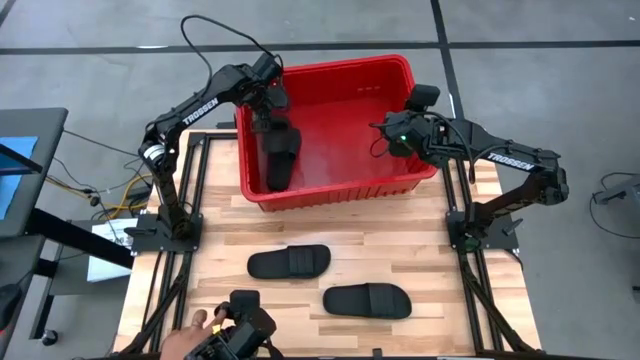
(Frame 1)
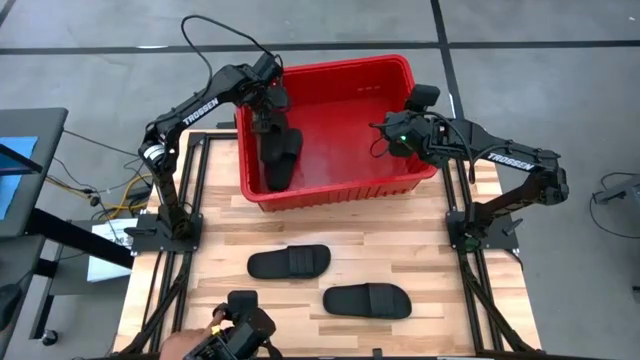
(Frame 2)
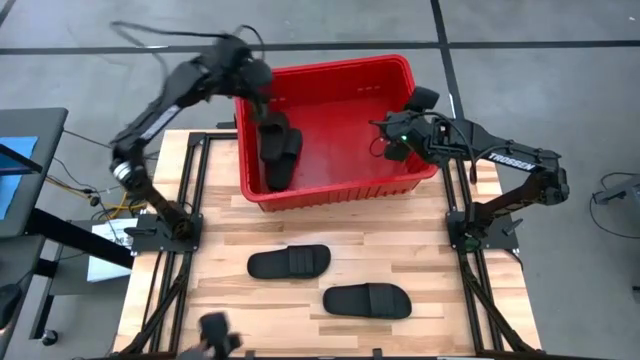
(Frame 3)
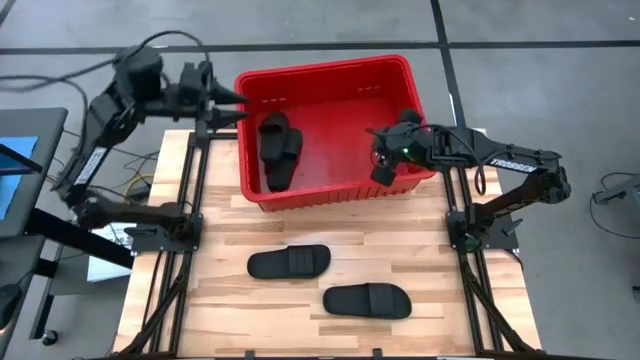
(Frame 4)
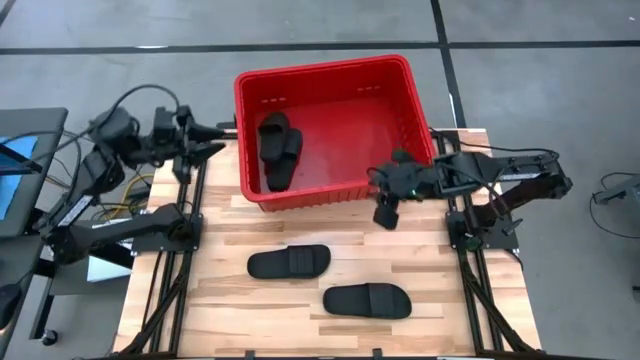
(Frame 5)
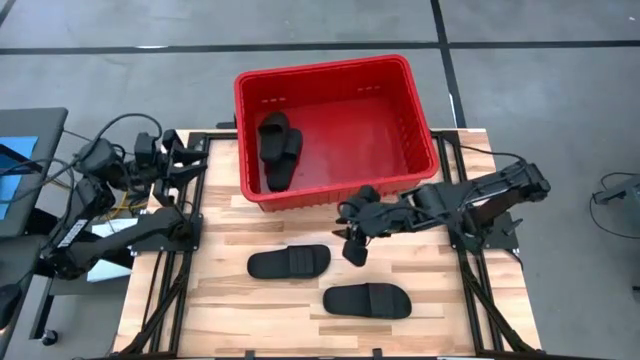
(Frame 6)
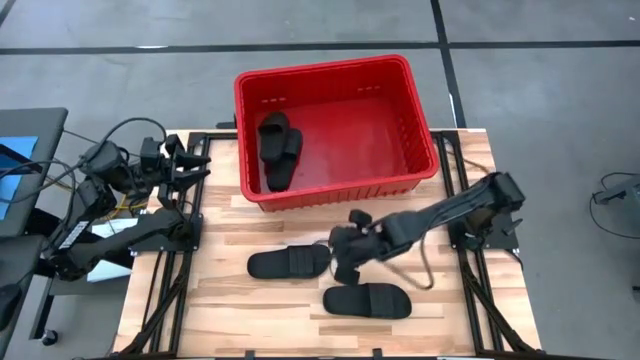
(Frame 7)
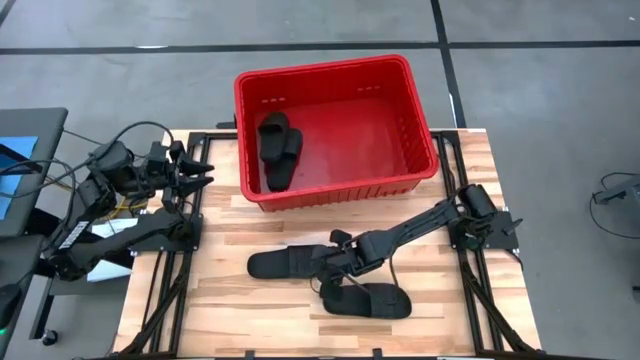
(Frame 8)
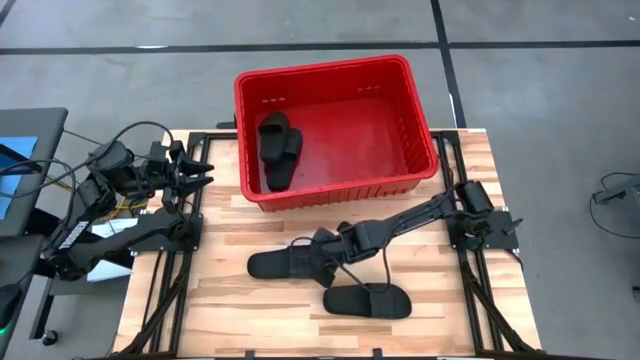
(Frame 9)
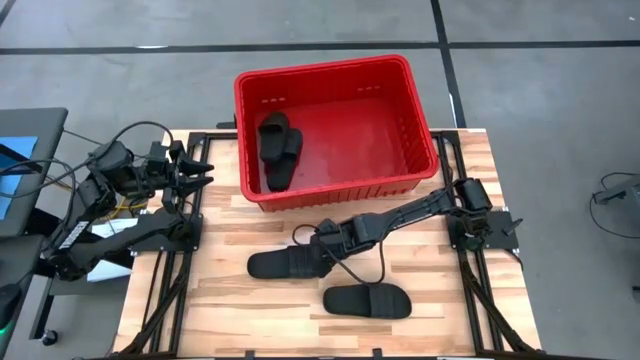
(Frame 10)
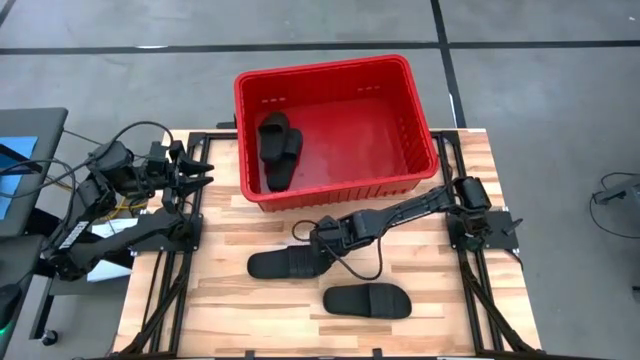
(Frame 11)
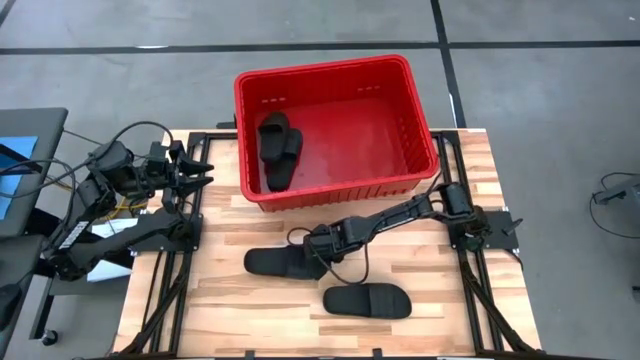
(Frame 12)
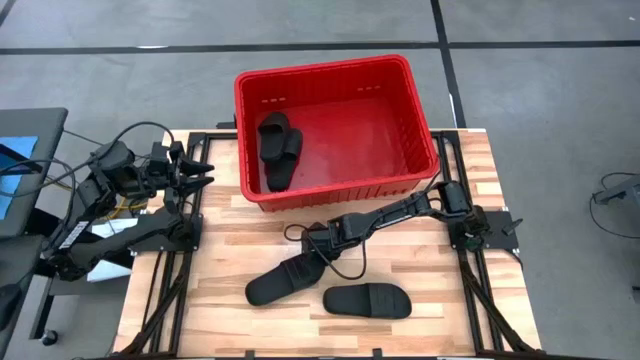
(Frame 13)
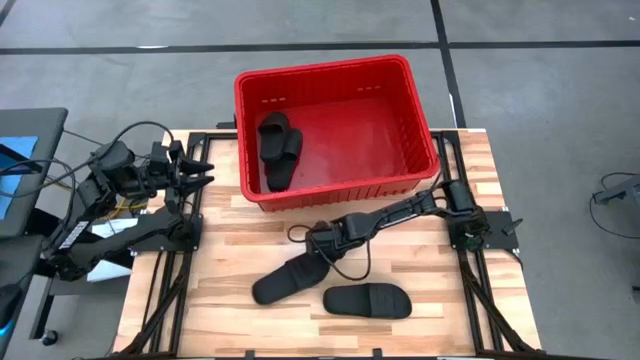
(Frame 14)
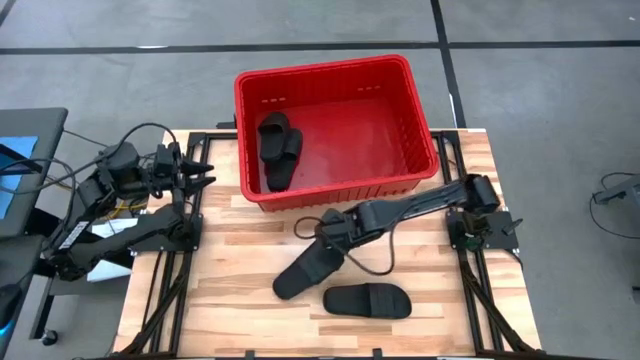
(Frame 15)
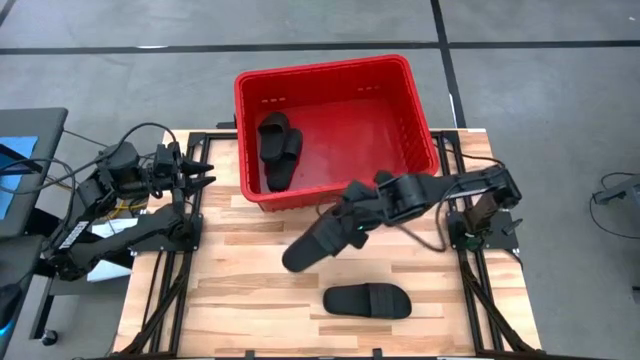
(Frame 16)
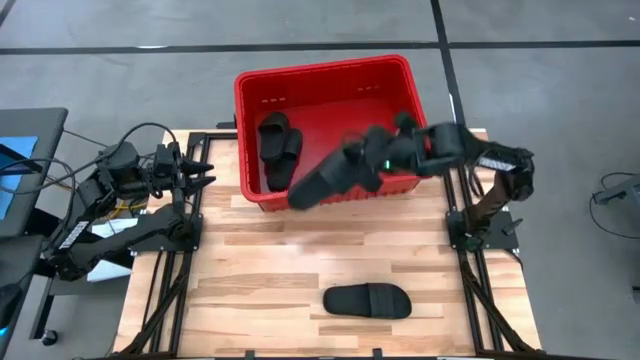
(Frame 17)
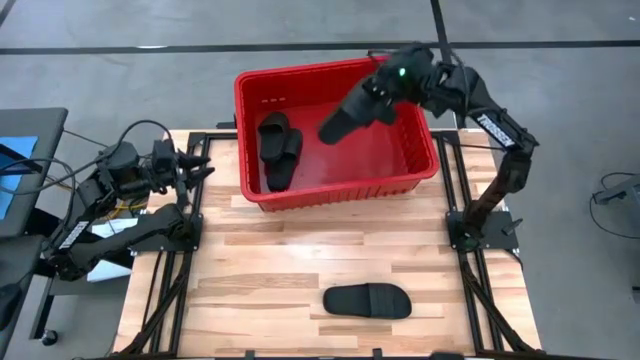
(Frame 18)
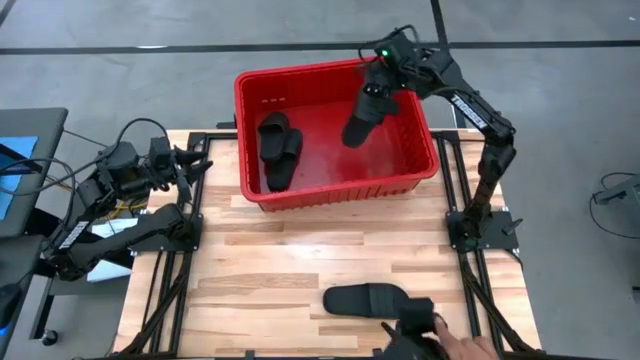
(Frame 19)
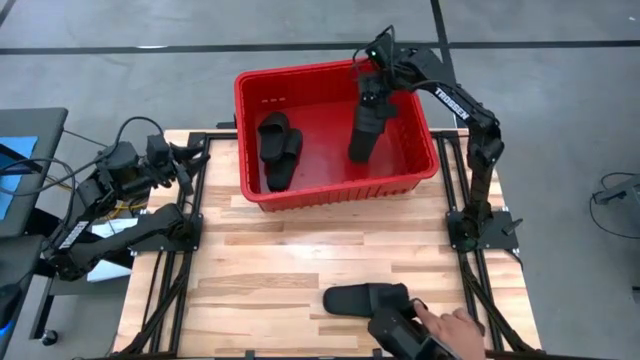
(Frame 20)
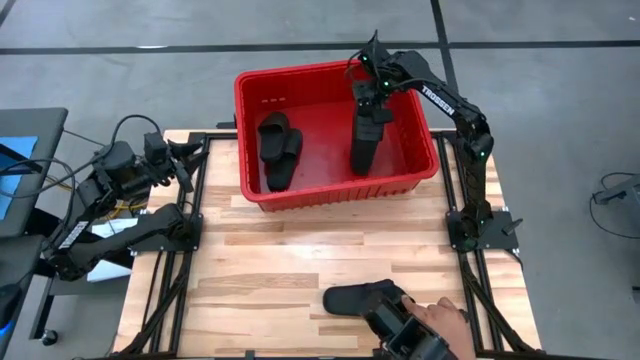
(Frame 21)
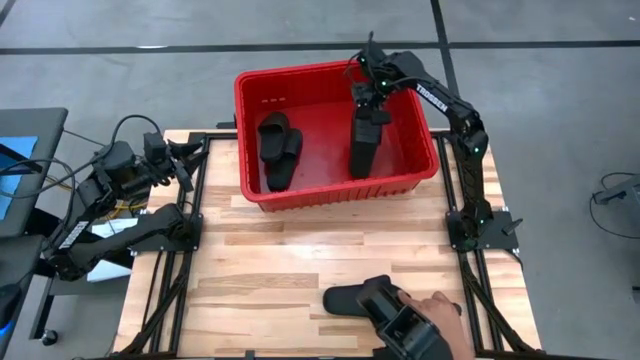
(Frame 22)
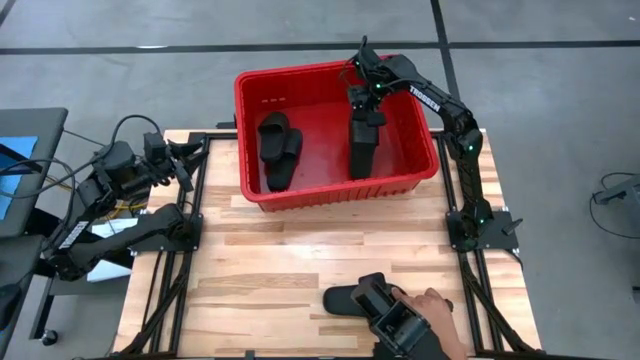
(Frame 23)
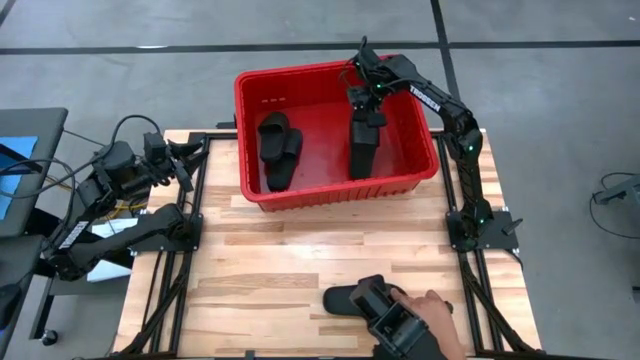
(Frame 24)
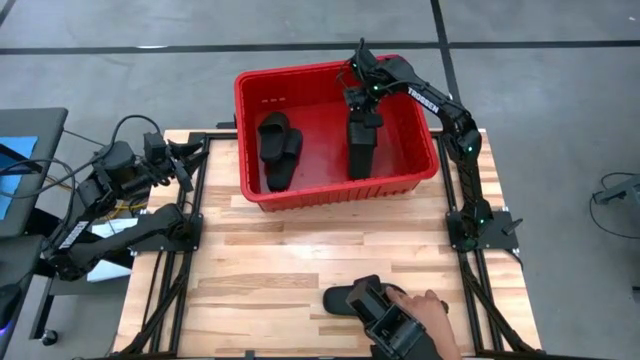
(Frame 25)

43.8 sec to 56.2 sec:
Task: Pick and place slides into bin
Put the left black slide into the red bin

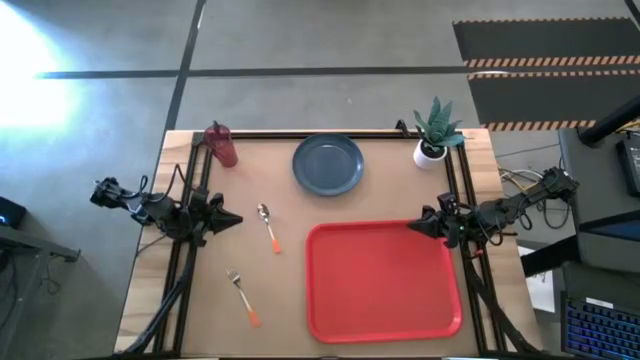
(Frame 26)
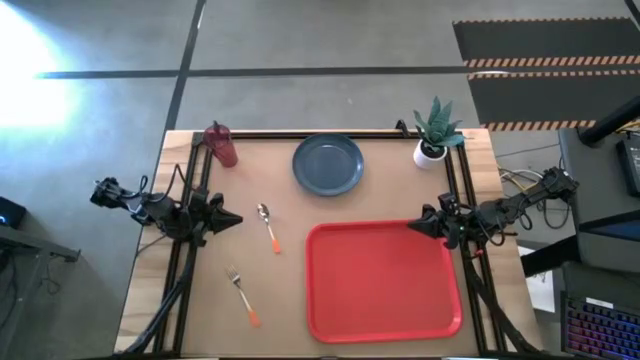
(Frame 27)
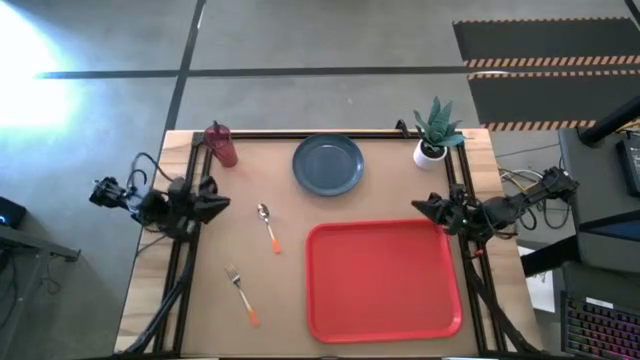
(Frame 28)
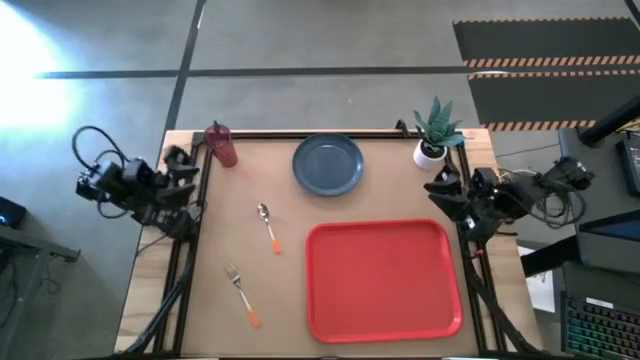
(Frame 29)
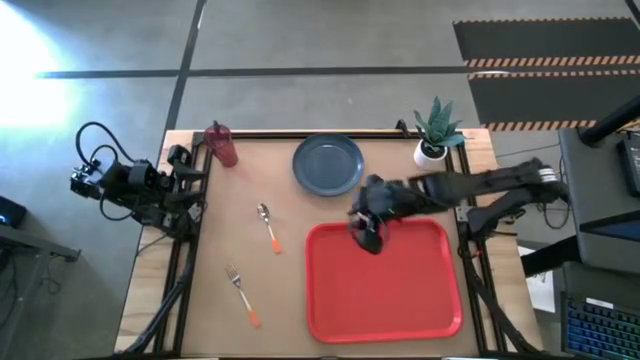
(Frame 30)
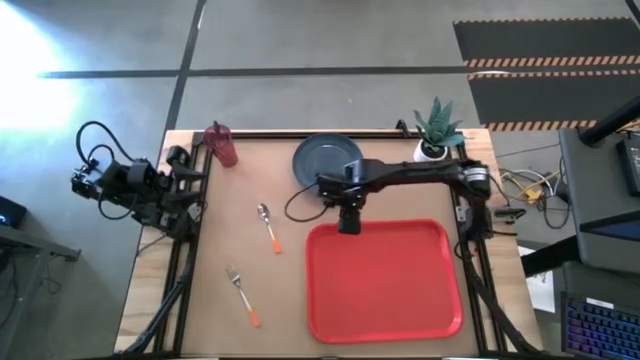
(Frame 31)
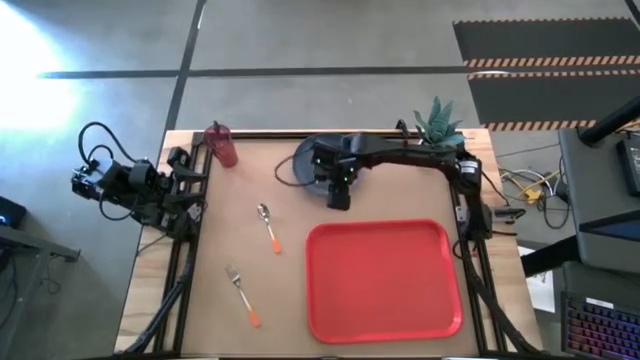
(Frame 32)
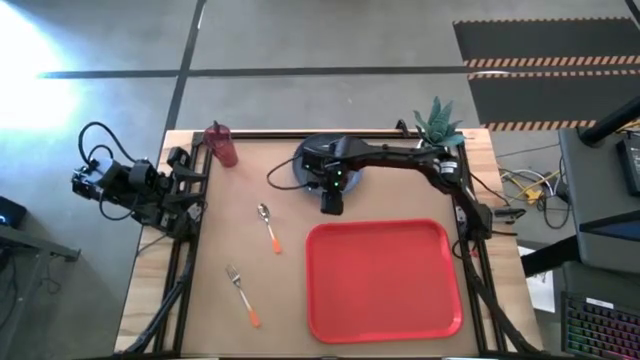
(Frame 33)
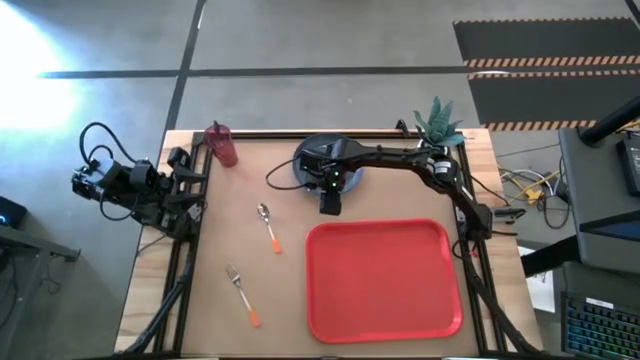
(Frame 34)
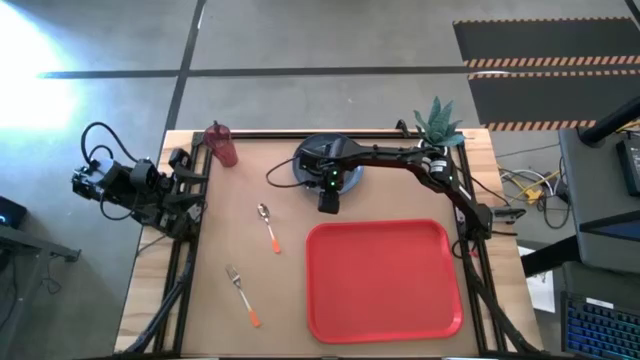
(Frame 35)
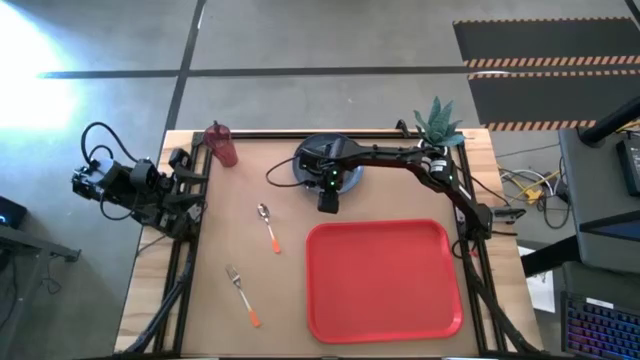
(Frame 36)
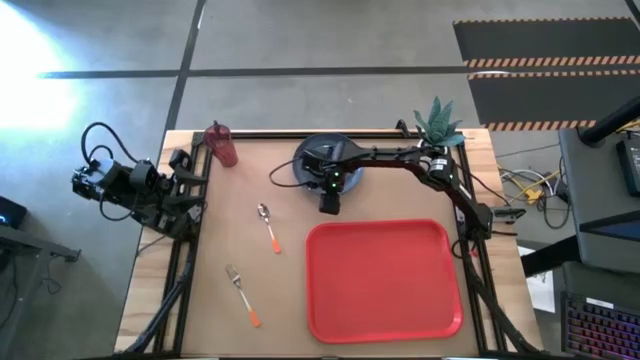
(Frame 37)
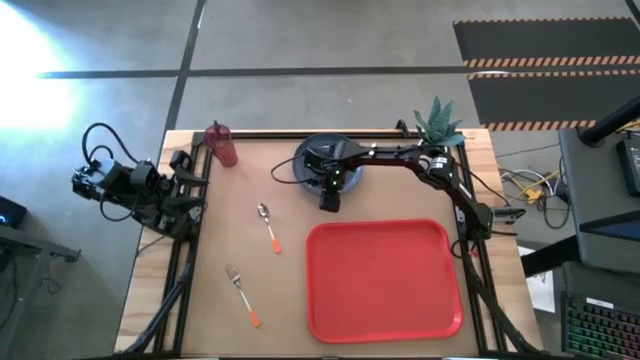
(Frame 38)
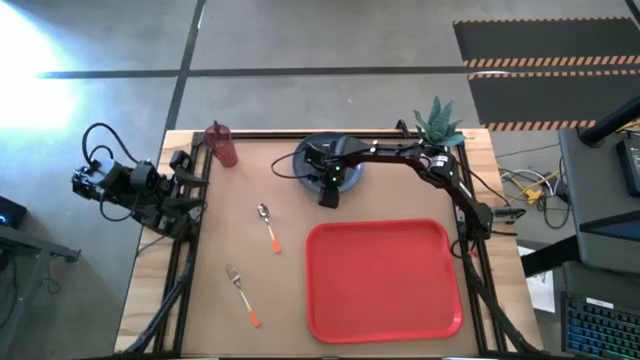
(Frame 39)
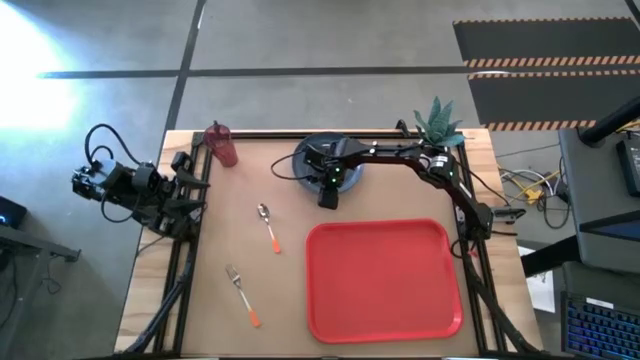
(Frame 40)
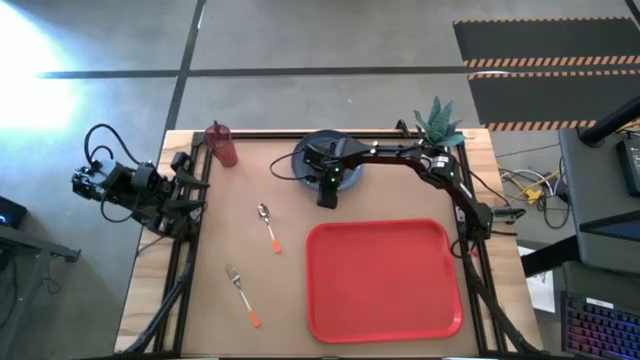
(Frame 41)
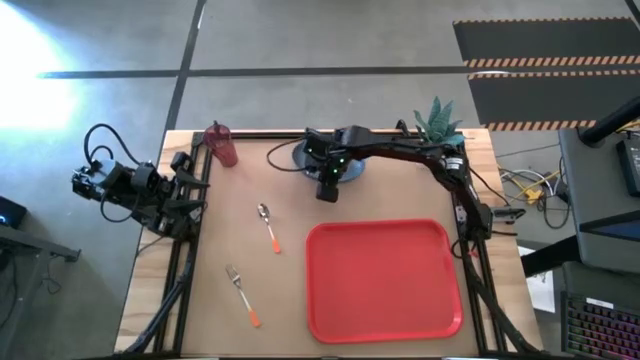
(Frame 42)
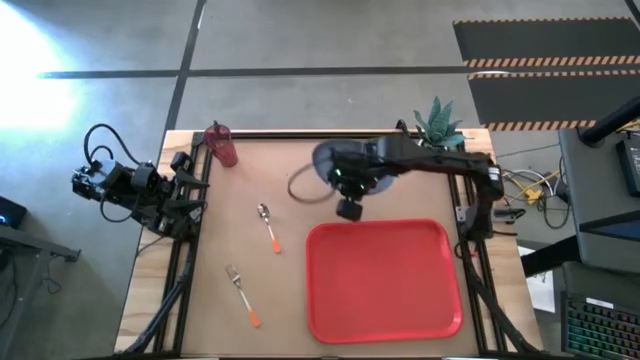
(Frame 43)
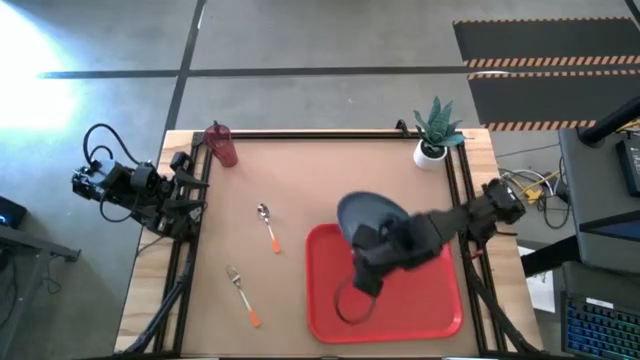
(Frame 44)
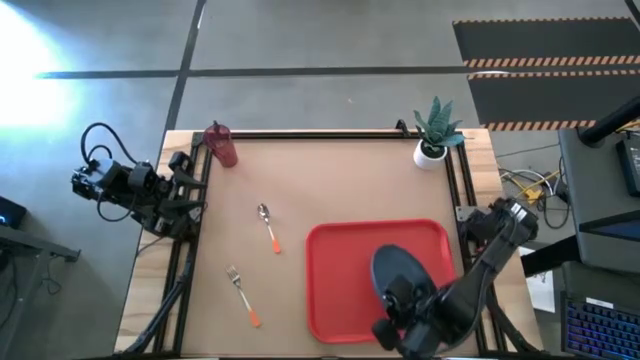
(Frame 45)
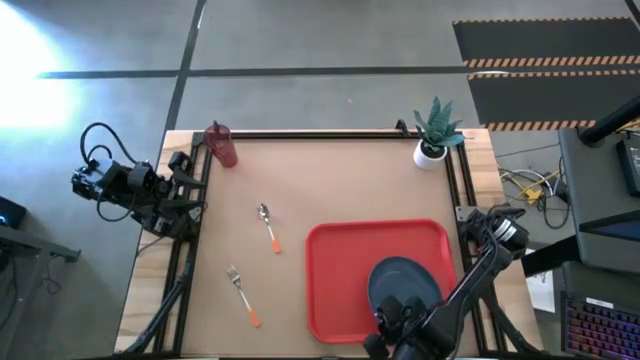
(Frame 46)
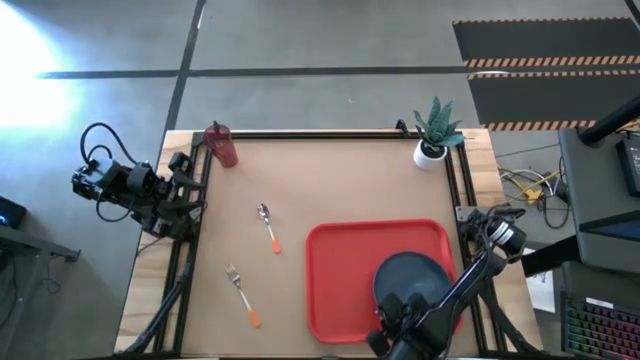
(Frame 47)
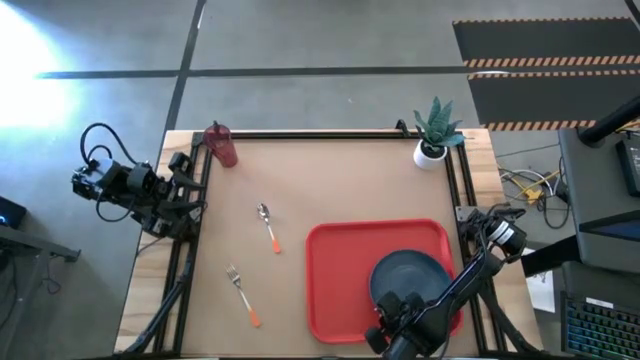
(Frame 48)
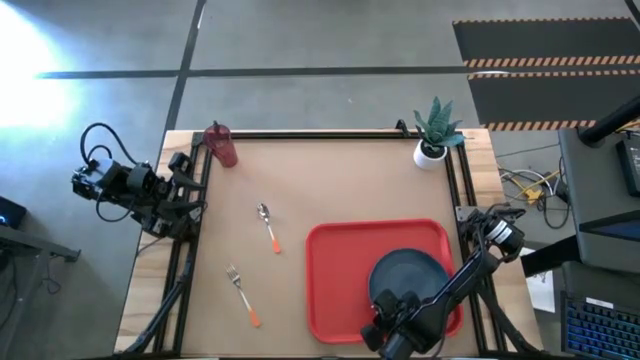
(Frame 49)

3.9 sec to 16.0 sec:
Task: Pick and place plate/cup/fork/spoon on tray
Put the blue plate on the orange serving tray
